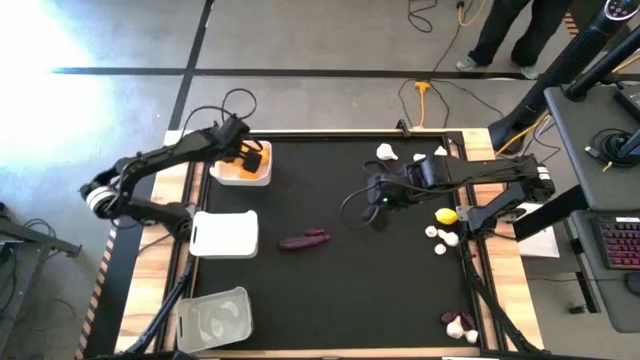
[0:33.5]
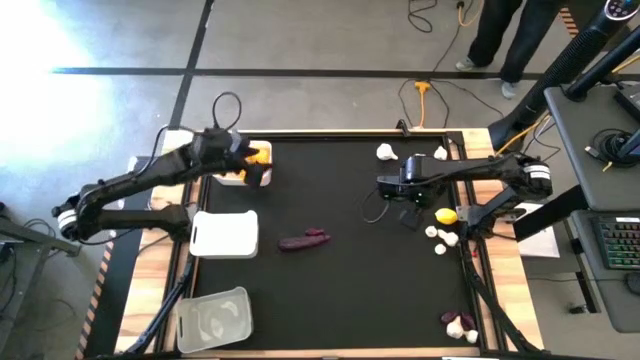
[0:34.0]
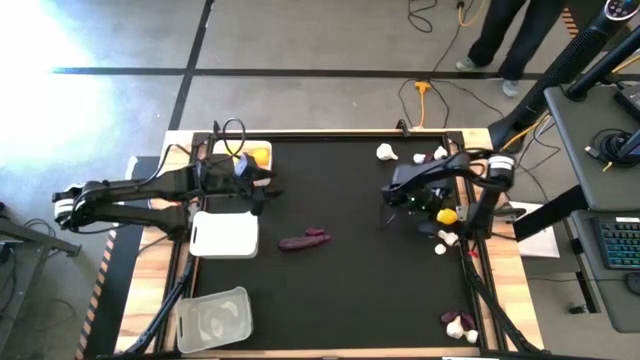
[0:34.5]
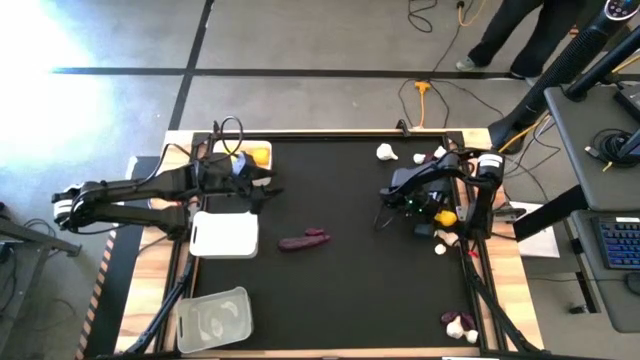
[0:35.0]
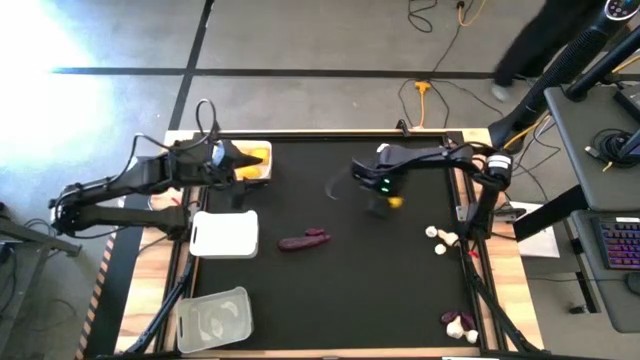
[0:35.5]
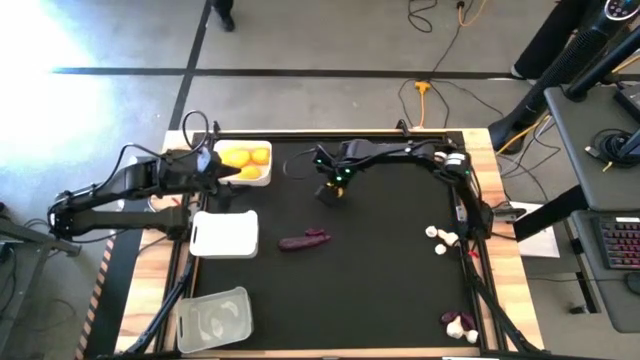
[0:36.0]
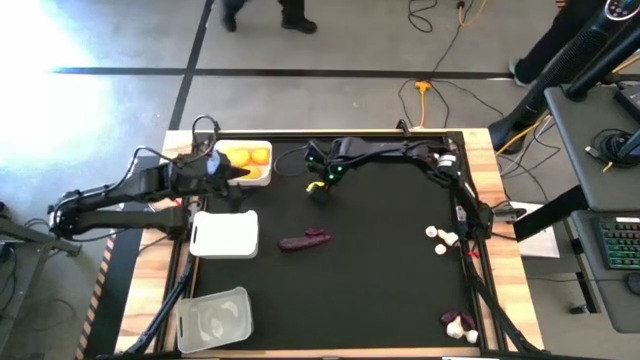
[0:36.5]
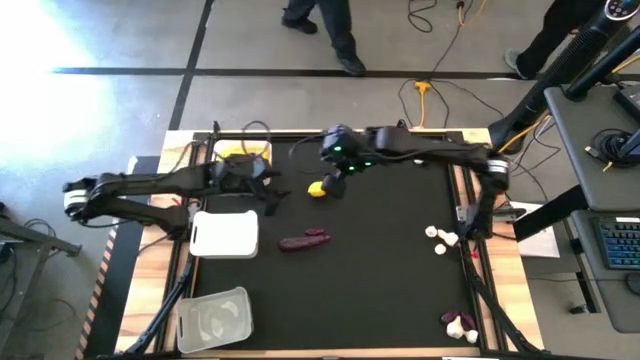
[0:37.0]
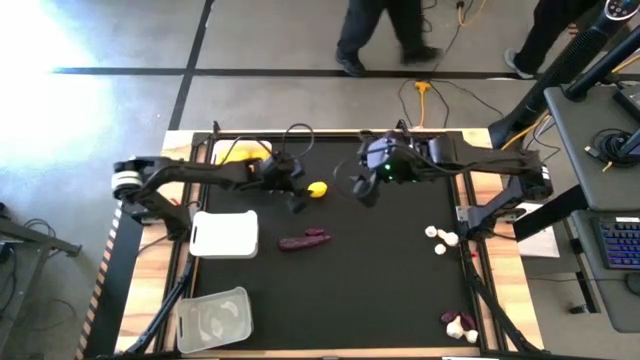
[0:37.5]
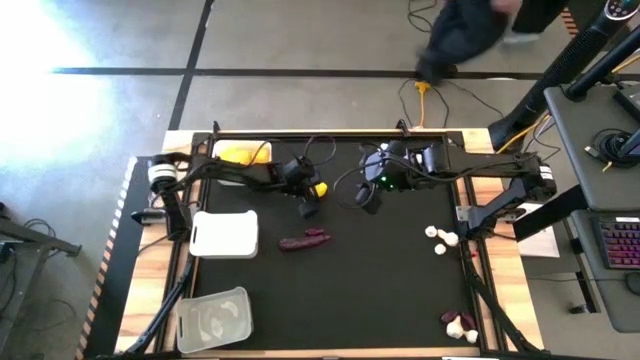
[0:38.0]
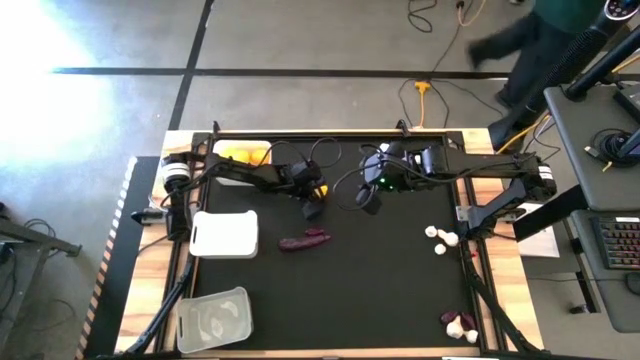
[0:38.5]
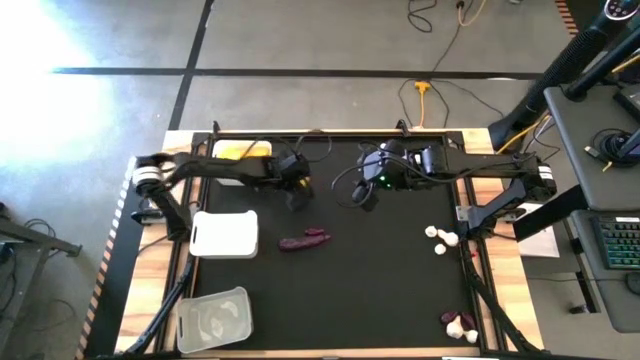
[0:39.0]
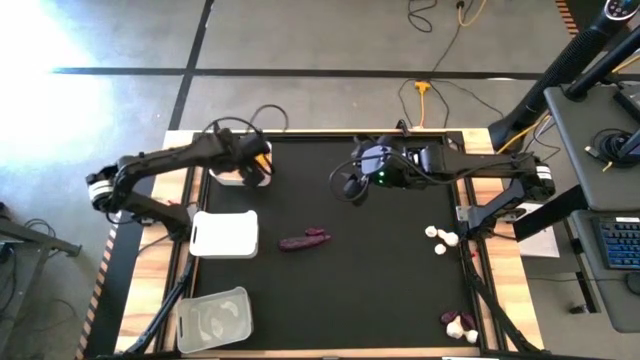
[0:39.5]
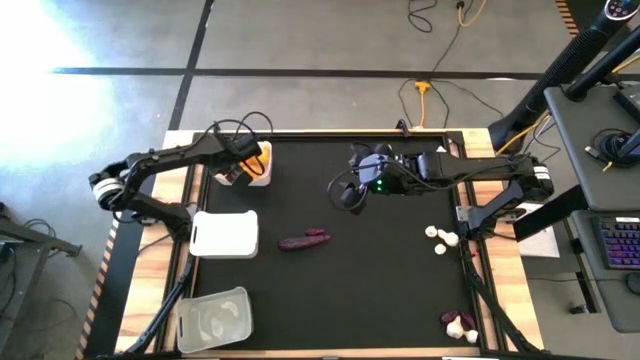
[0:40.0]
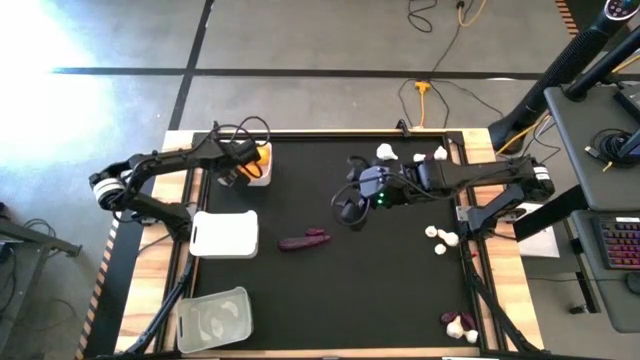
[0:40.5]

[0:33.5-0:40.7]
Task: Sort produce into baskets
Put the lemon into the top white bin

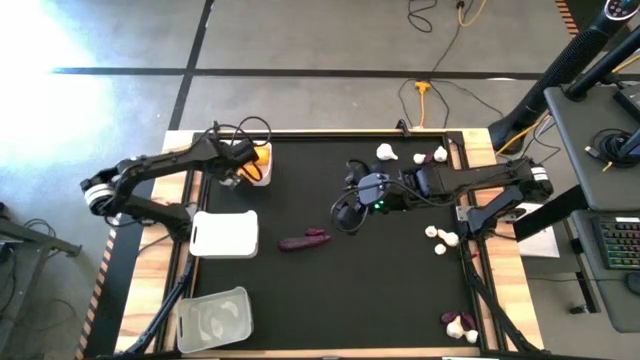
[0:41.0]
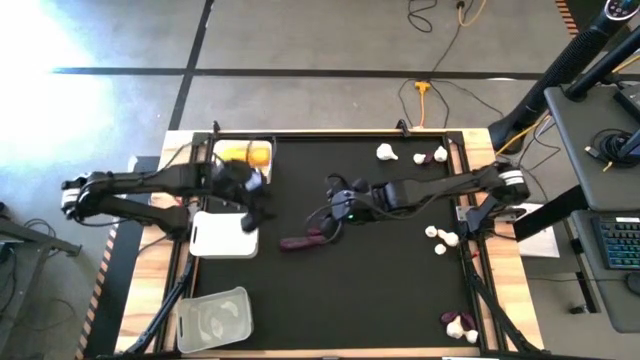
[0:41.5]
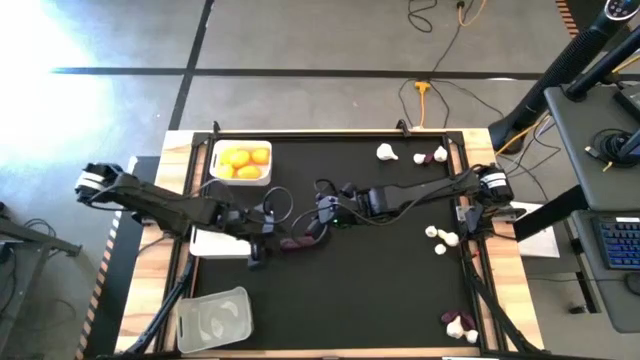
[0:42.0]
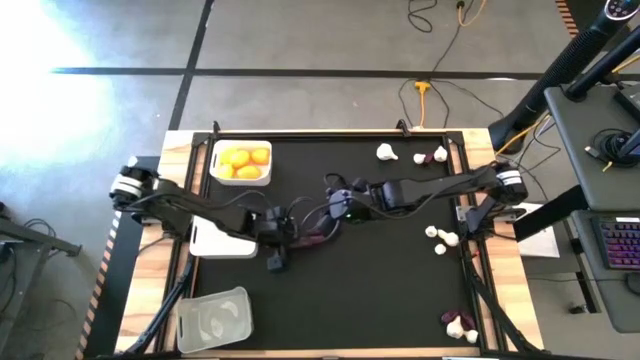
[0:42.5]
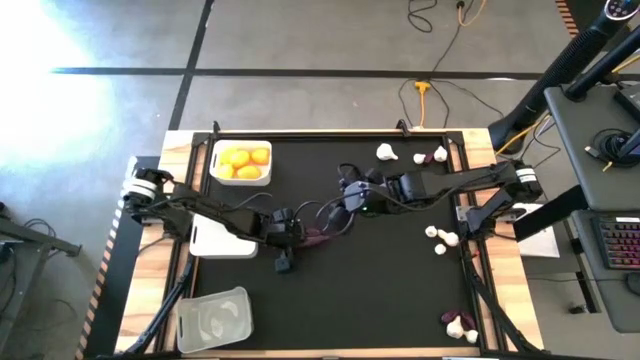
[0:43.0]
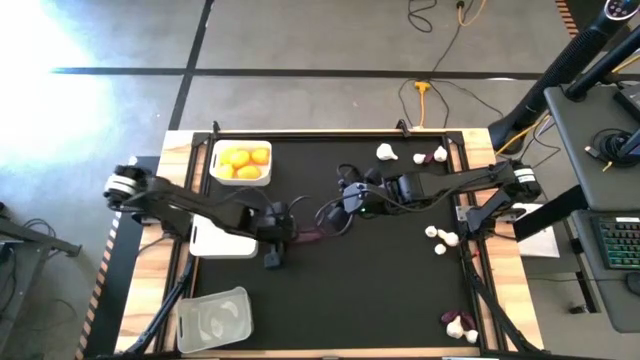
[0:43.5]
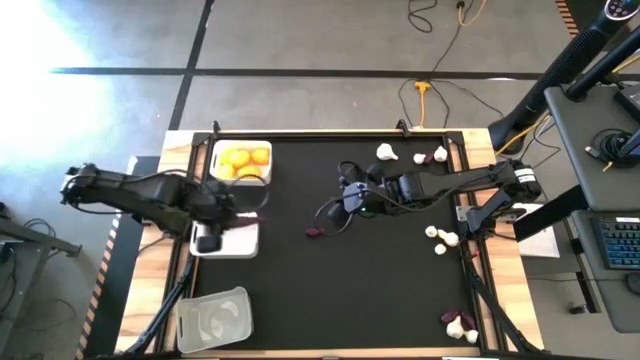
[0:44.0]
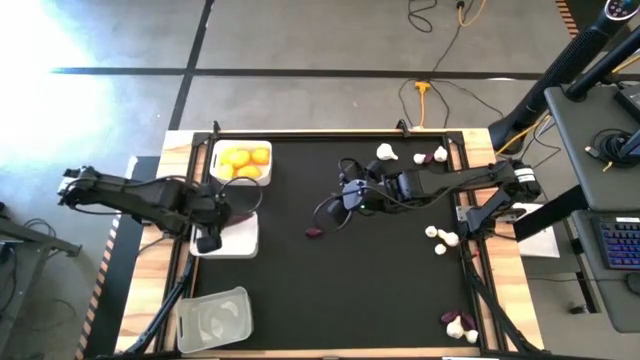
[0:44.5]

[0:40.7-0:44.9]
Put the eggplant into the bottom white bin

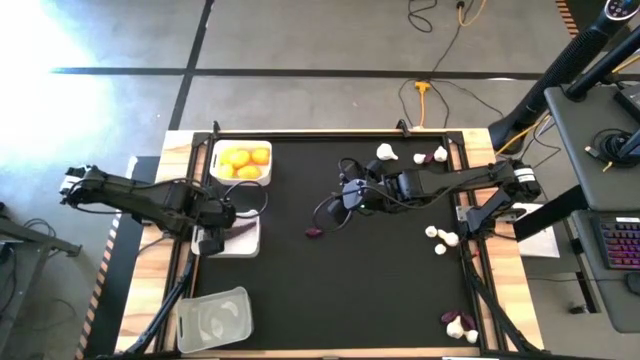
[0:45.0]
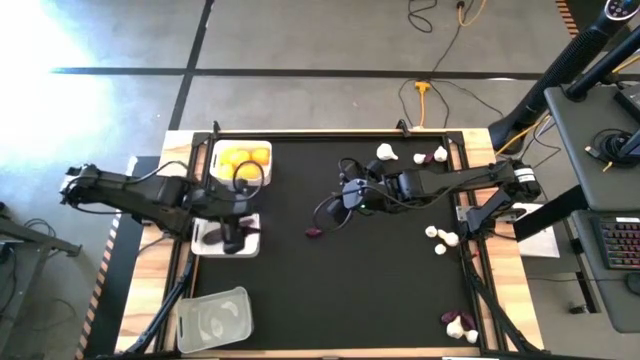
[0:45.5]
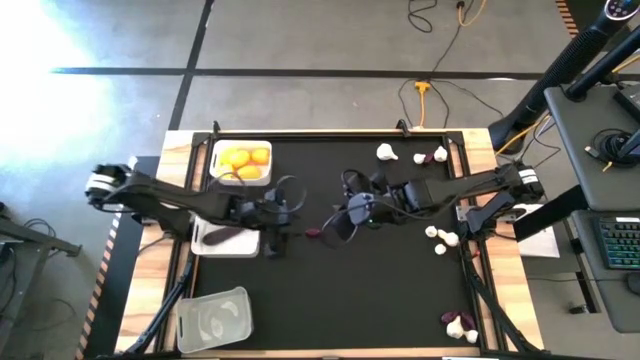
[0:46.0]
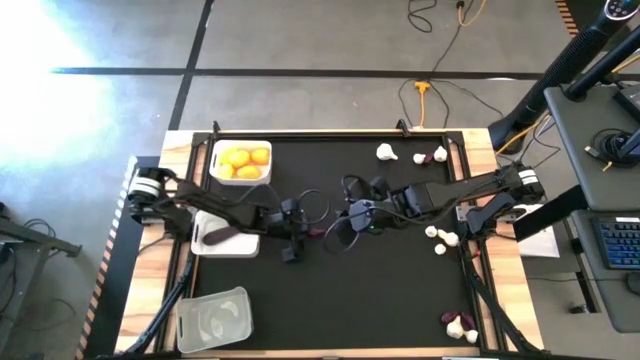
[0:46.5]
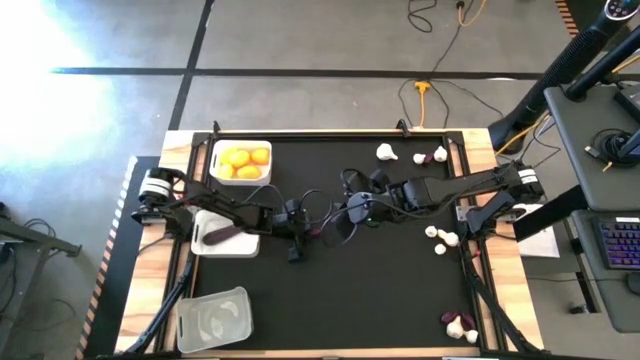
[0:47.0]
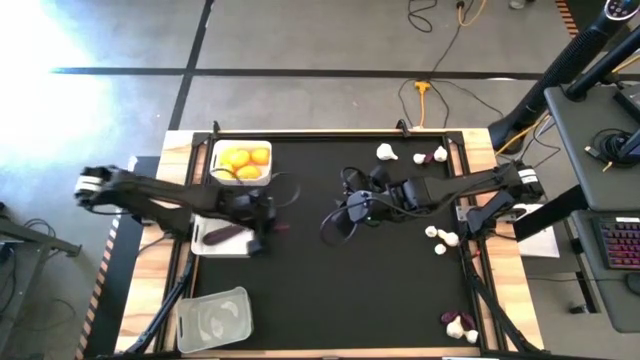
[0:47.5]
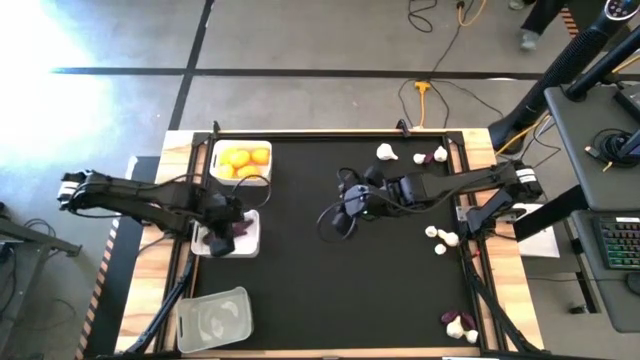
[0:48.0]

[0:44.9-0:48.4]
Put the eggplant into the bottom white bin

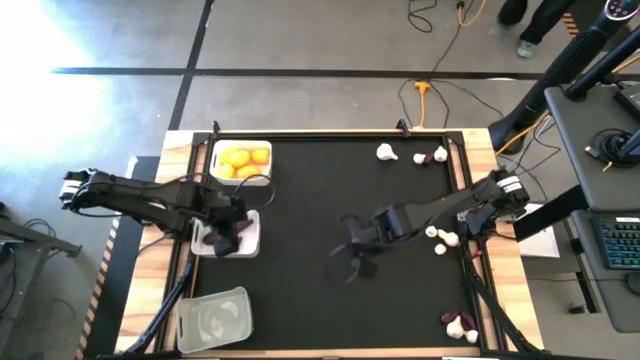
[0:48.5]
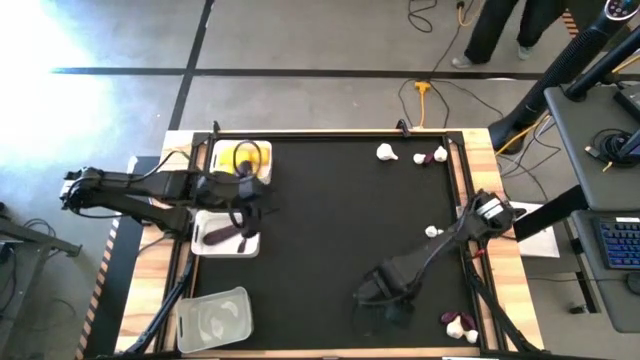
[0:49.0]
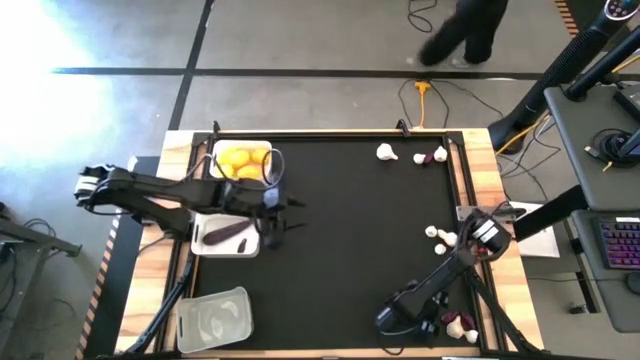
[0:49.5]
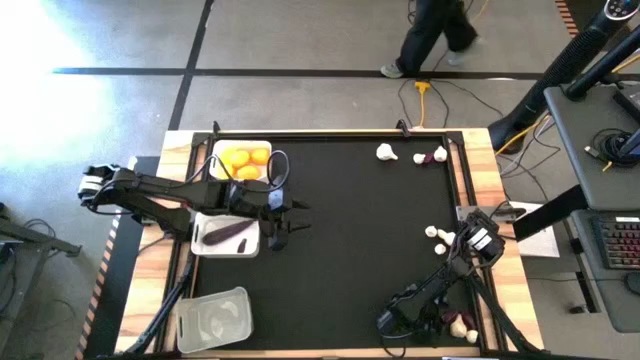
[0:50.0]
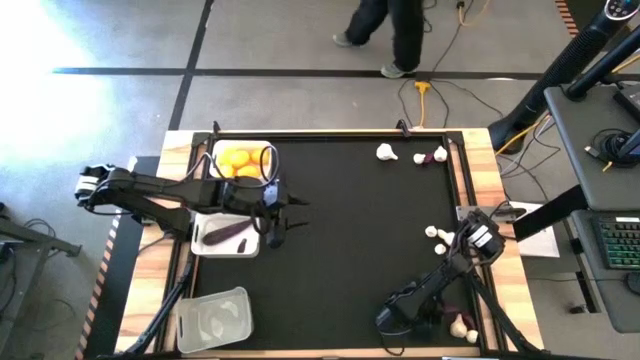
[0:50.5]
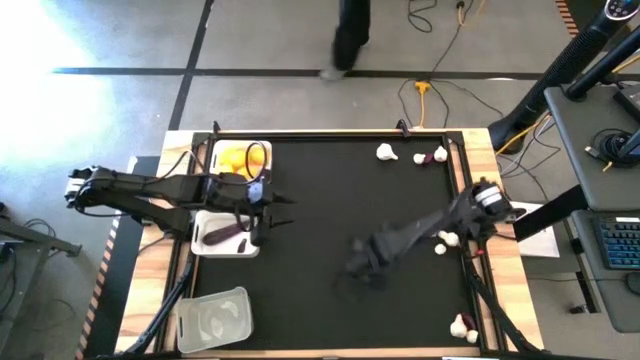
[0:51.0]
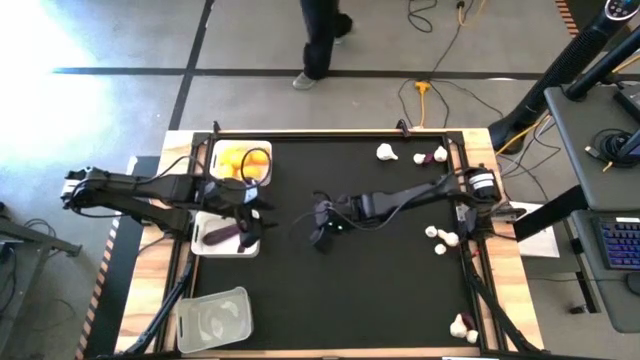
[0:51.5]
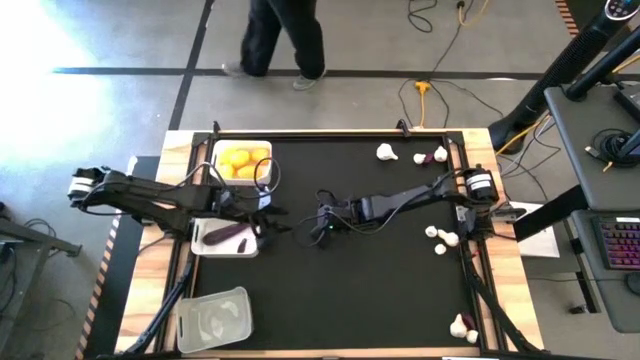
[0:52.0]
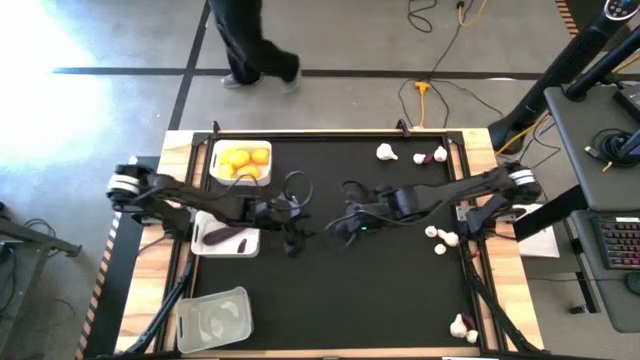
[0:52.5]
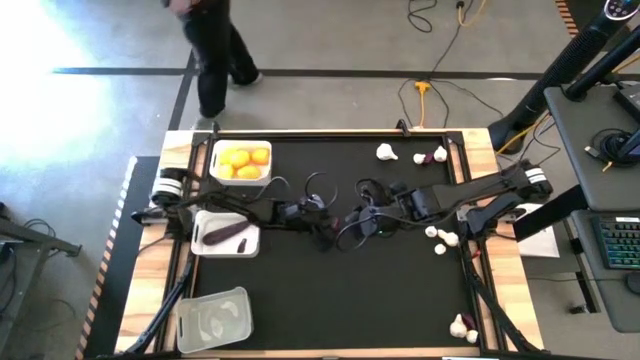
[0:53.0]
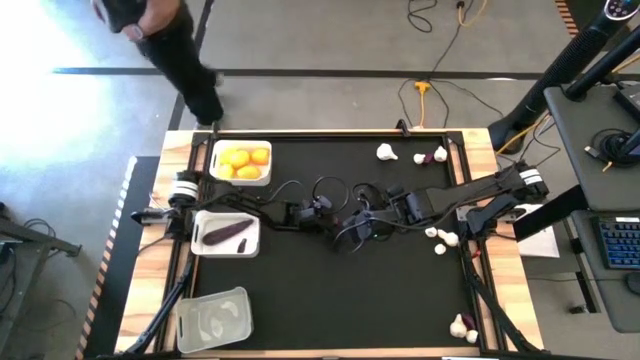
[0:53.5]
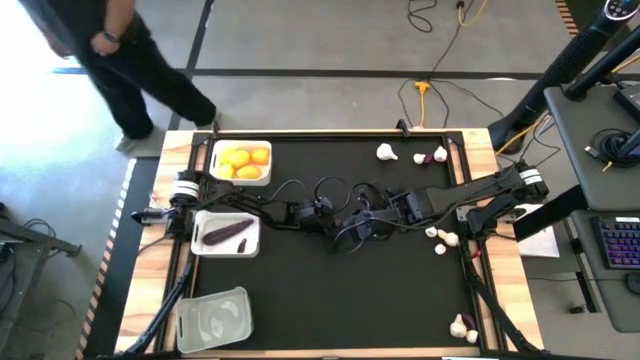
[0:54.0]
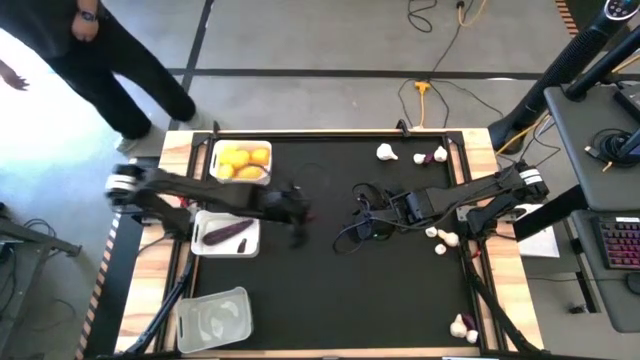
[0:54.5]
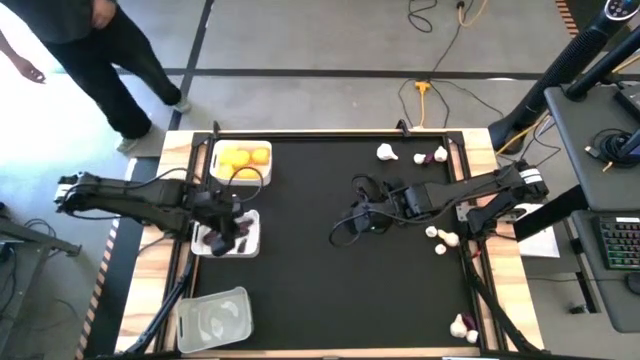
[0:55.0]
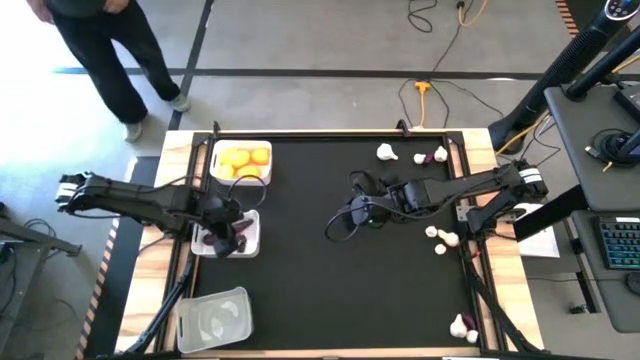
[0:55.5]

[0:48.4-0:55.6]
Put the eggplant into the bottom white bin
